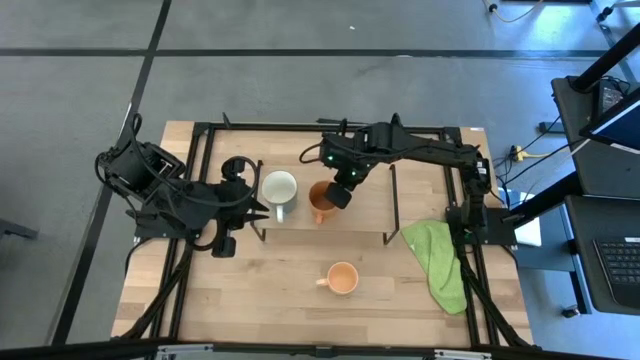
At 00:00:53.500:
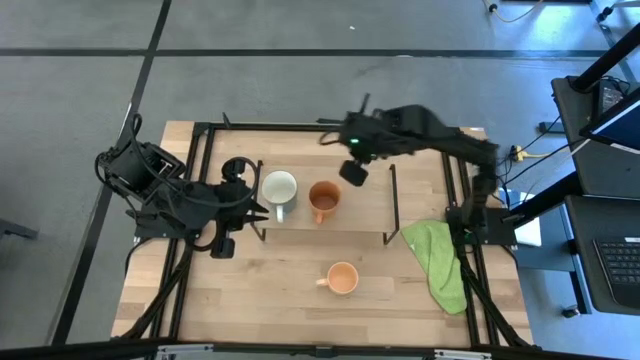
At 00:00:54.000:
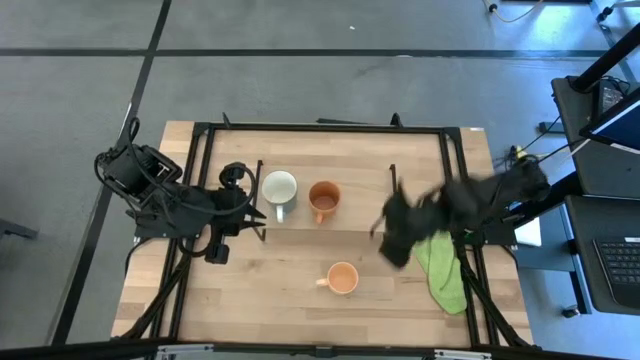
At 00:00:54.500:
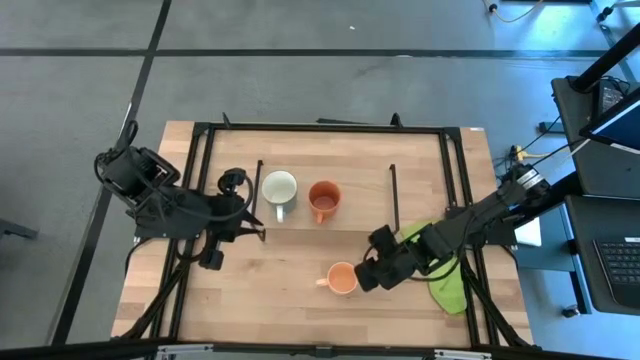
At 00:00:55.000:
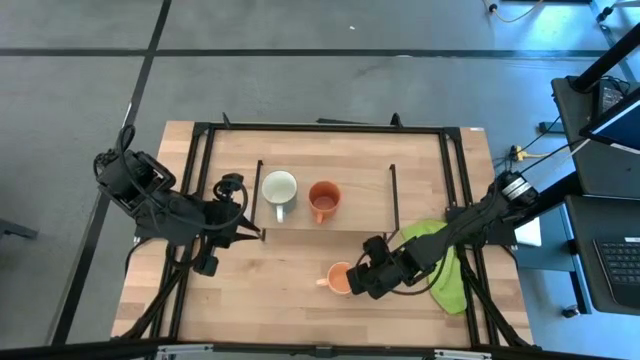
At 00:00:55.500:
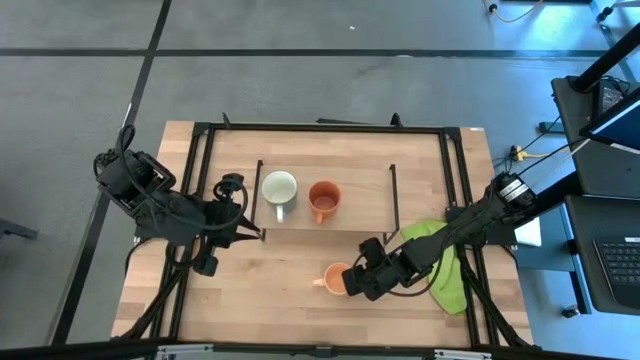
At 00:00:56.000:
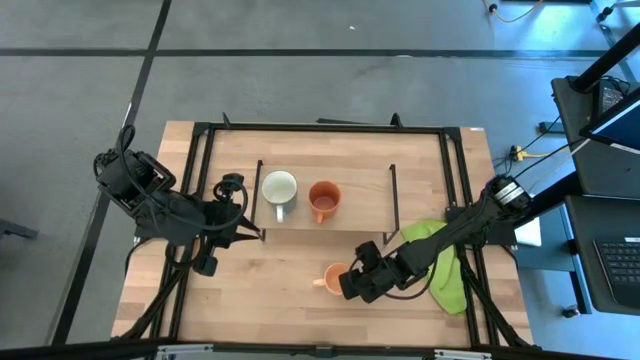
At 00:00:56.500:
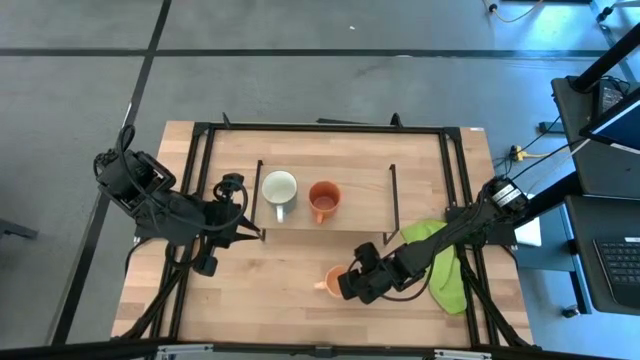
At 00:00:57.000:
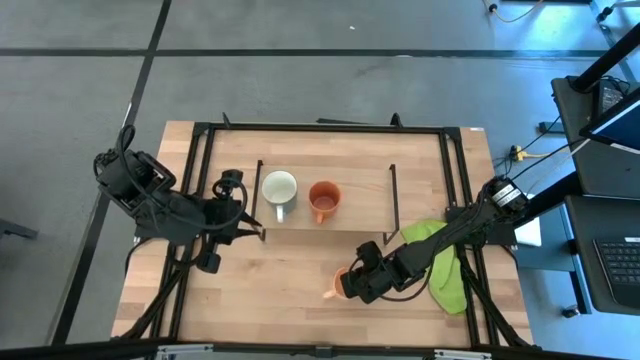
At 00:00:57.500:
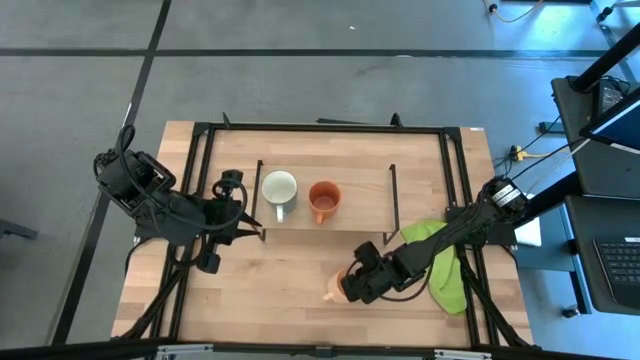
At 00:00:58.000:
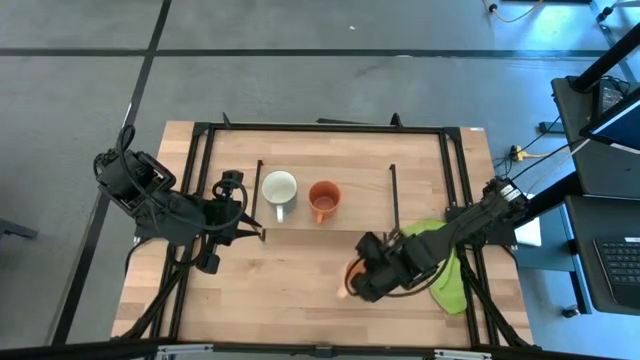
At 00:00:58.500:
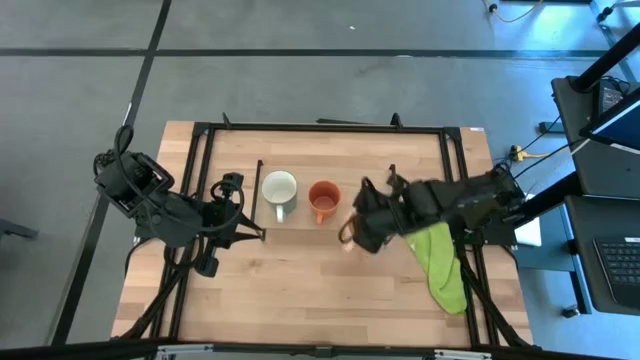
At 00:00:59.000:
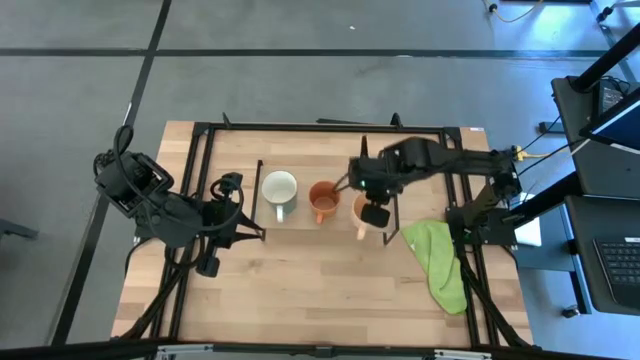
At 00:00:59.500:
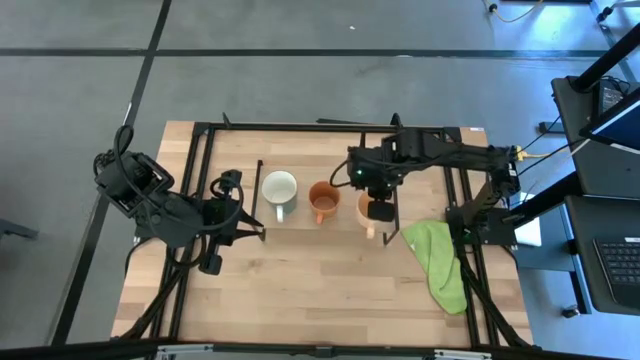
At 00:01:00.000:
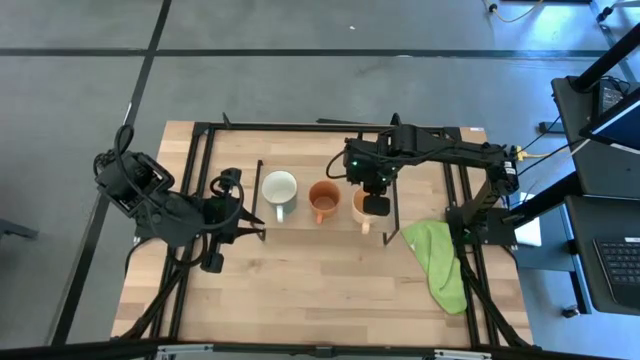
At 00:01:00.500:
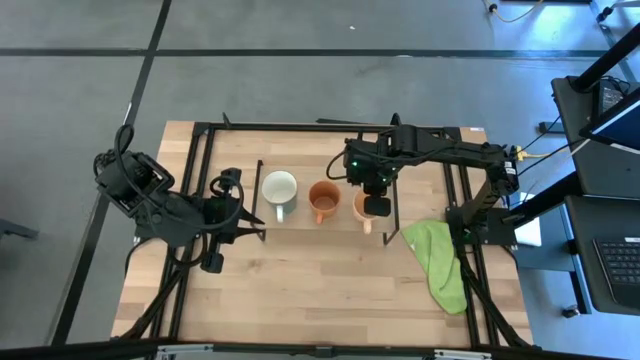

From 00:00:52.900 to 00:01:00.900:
Task: Stack small to large cups/mugs on shelf
Put the light orange mug on the shelf

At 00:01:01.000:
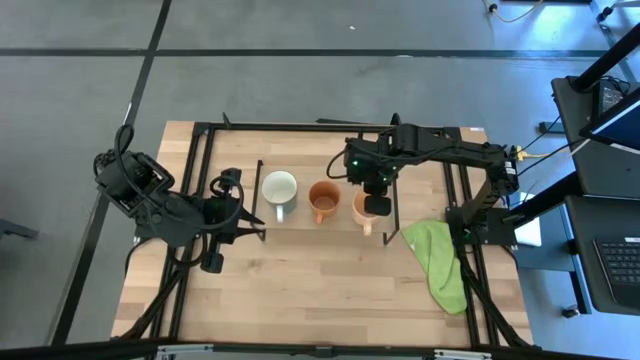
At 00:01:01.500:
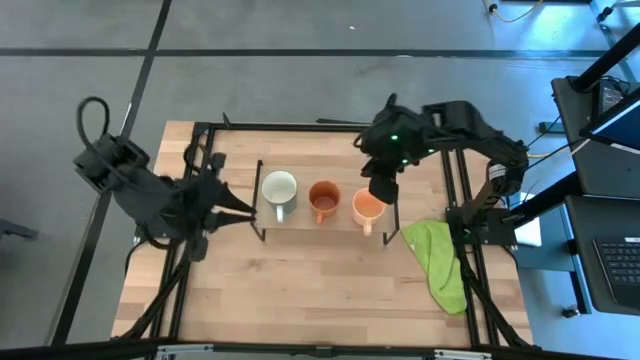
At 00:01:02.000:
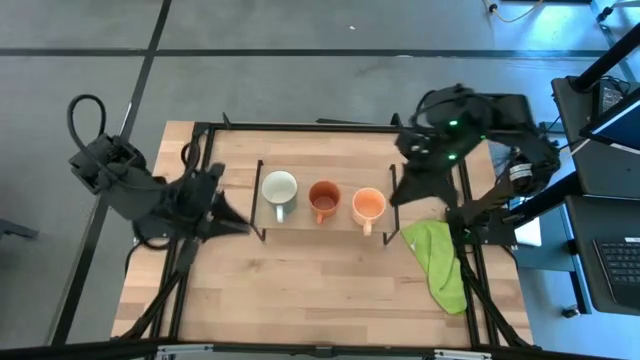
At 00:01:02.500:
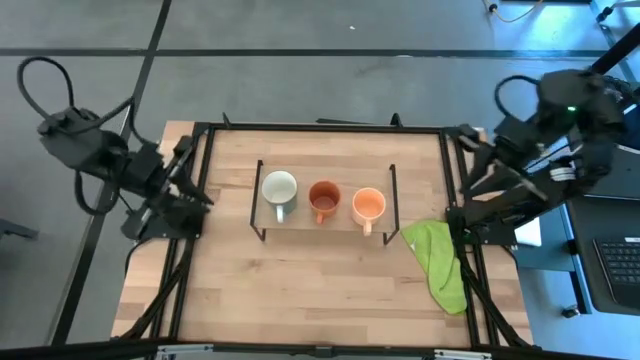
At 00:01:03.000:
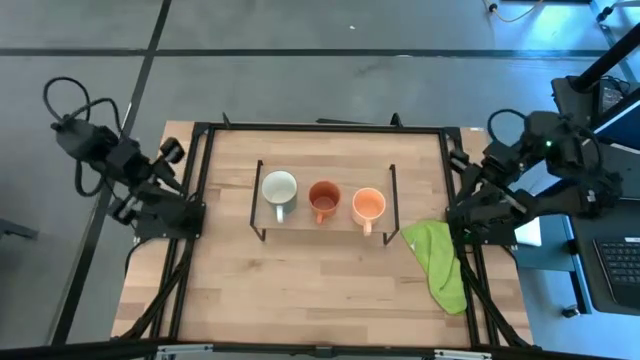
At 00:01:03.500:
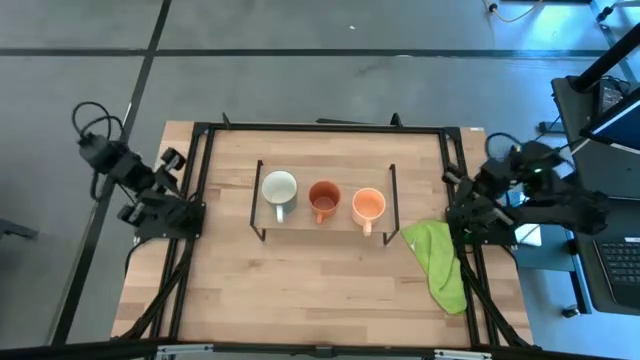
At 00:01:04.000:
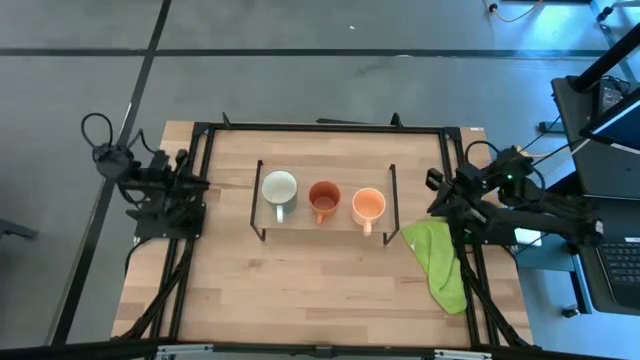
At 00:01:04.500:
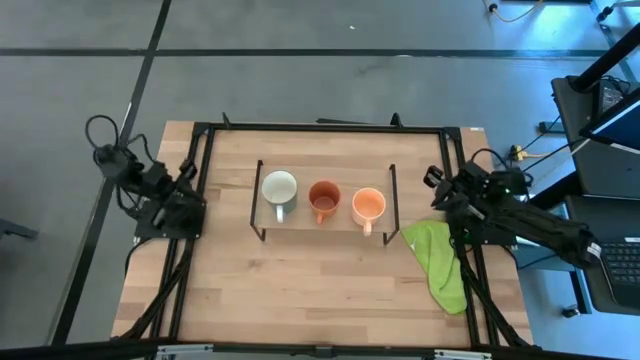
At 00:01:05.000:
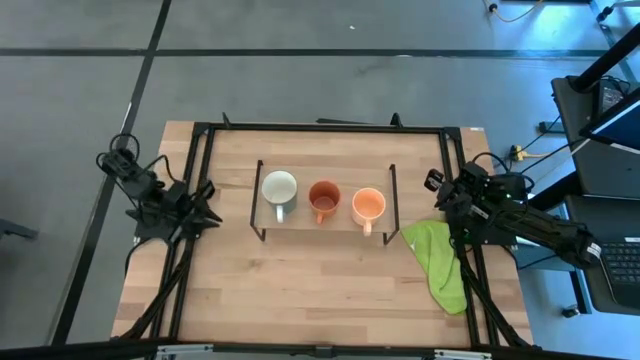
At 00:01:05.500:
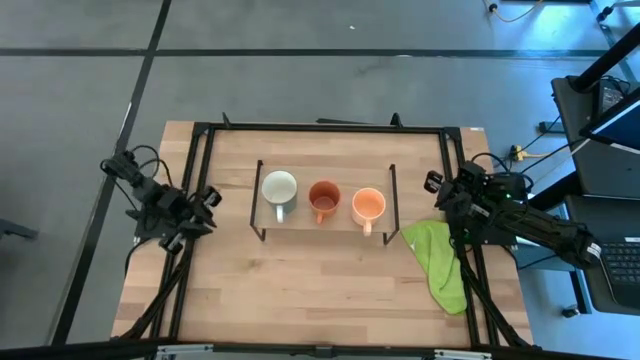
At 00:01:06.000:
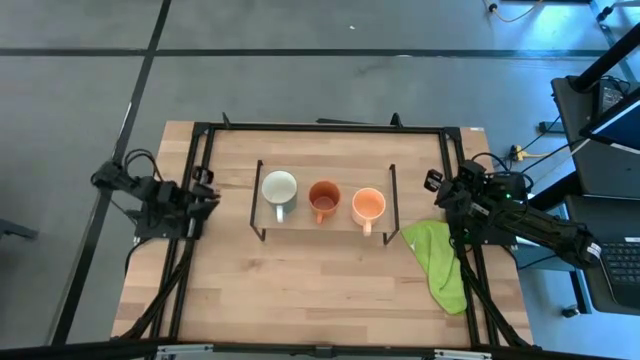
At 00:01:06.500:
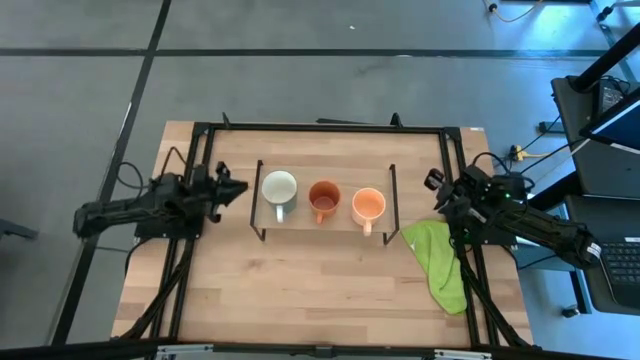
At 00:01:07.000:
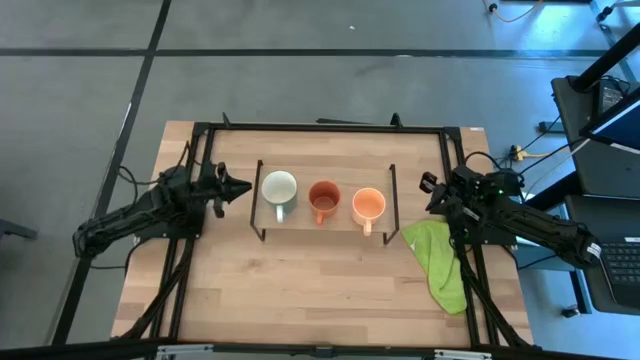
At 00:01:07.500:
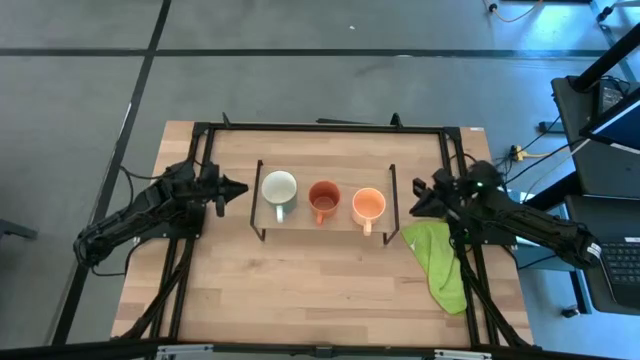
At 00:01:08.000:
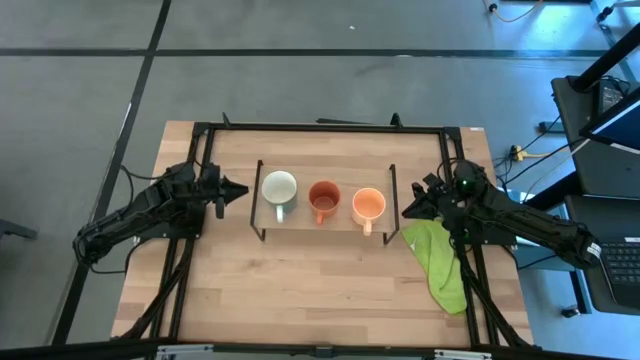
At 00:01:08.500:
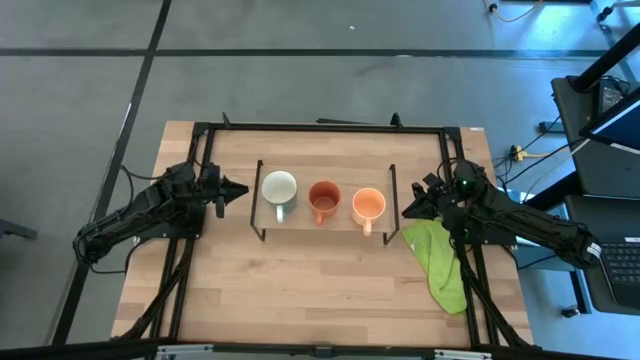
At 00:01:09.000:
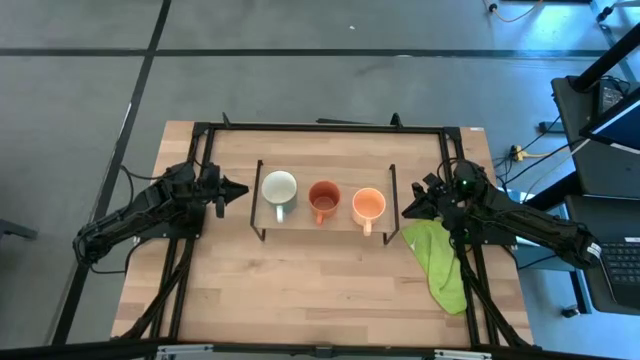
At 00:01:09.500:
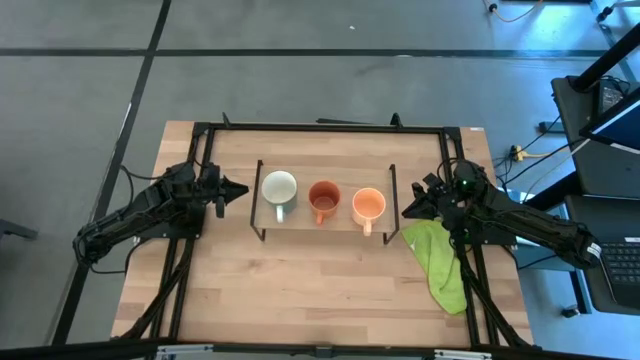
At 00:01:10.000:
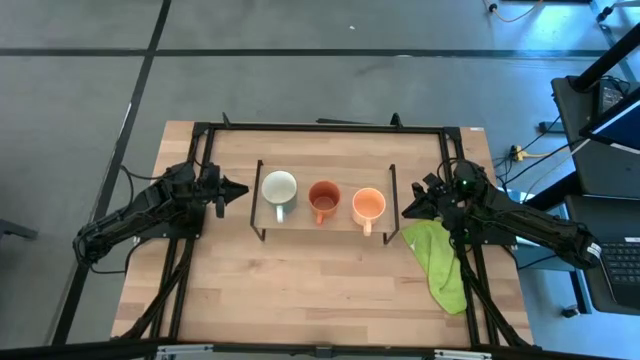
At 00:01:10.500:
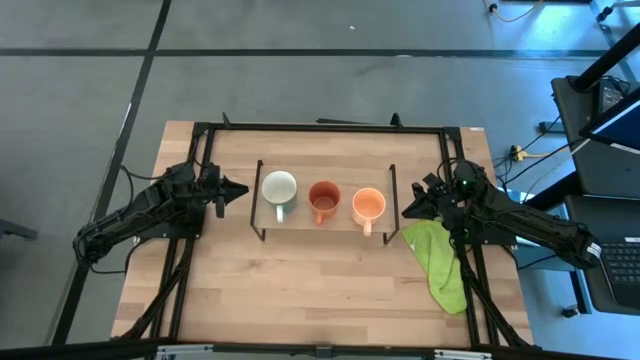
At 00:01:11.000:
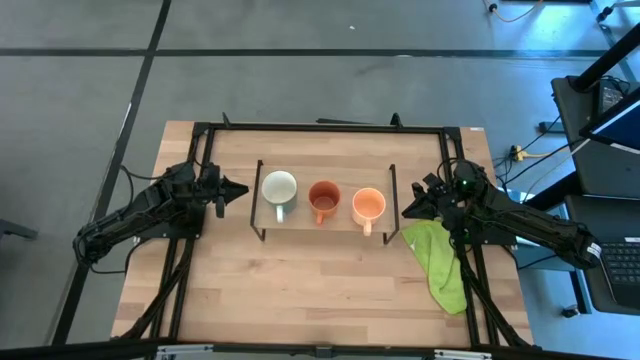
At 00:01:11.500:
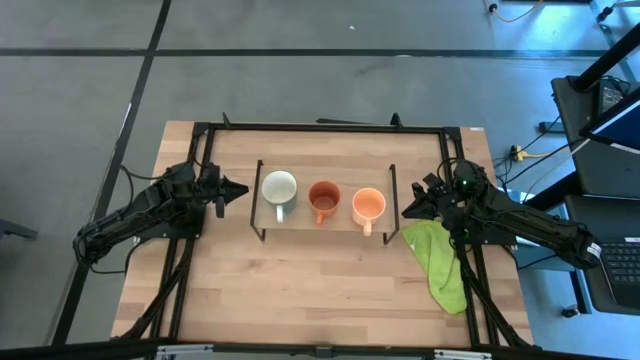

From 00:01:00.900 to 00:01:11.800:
Return to Home Position
